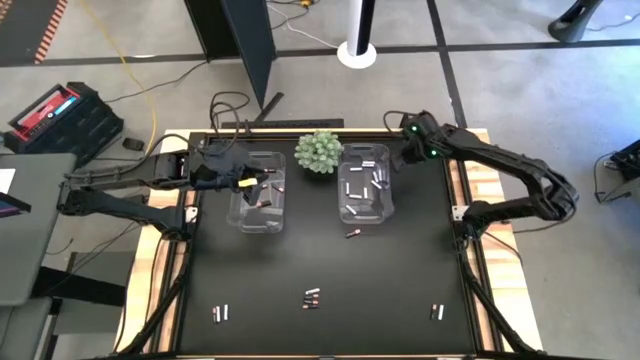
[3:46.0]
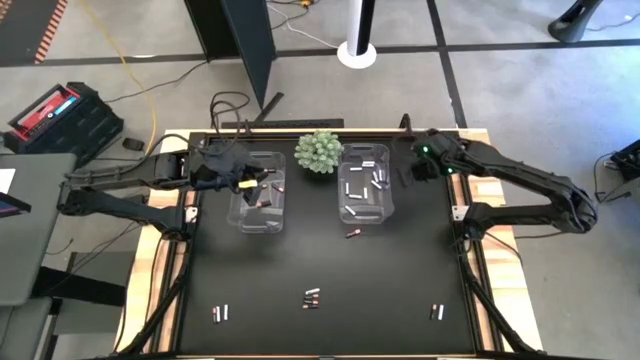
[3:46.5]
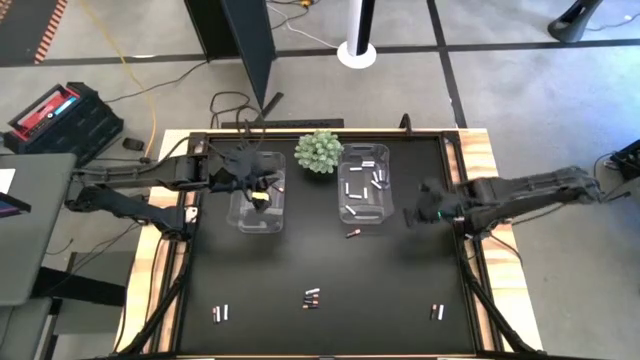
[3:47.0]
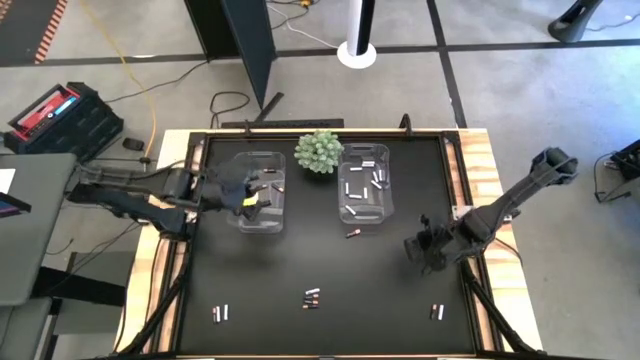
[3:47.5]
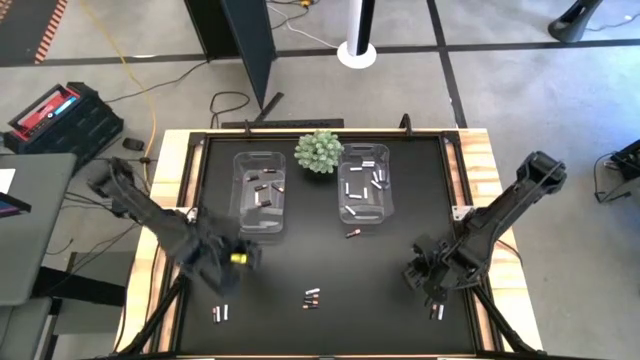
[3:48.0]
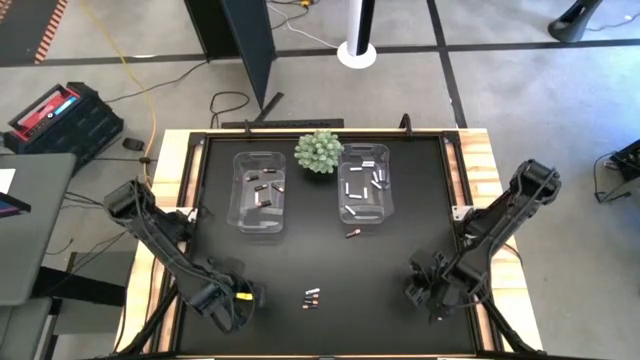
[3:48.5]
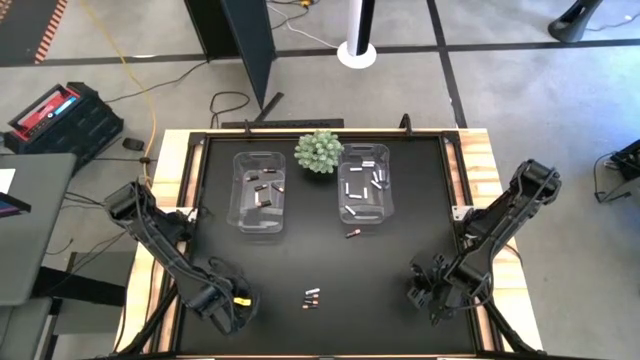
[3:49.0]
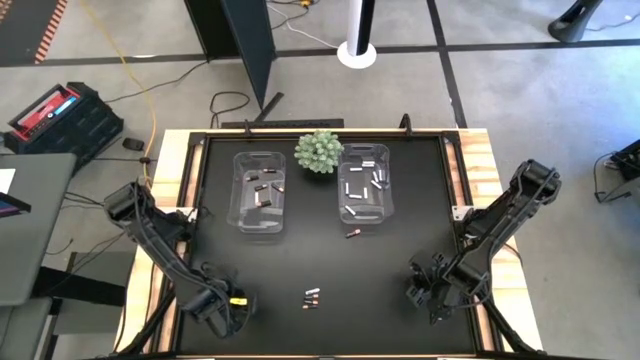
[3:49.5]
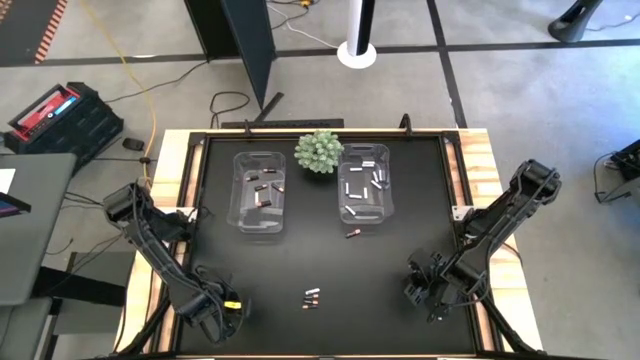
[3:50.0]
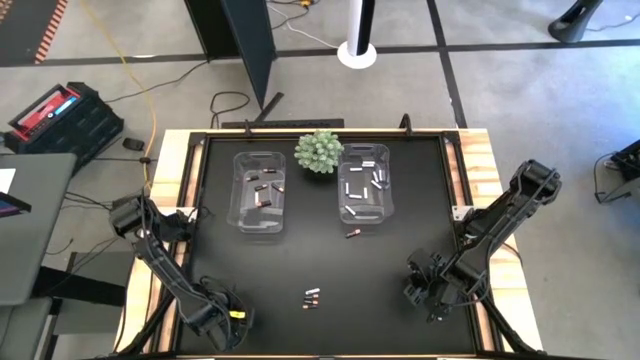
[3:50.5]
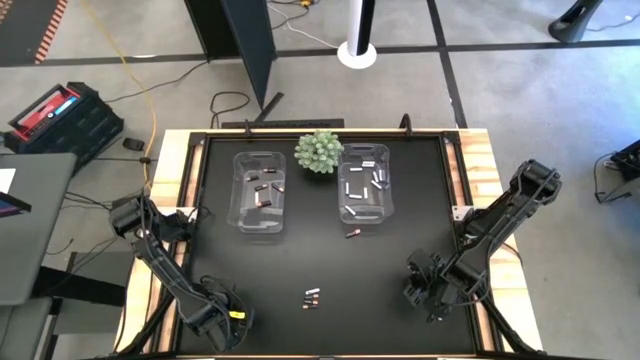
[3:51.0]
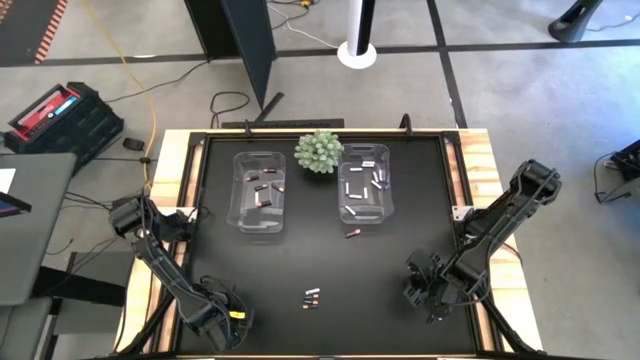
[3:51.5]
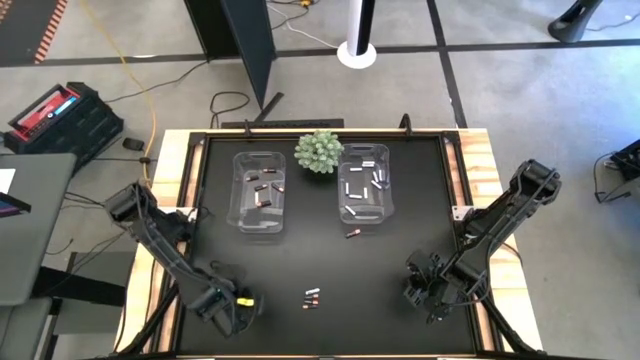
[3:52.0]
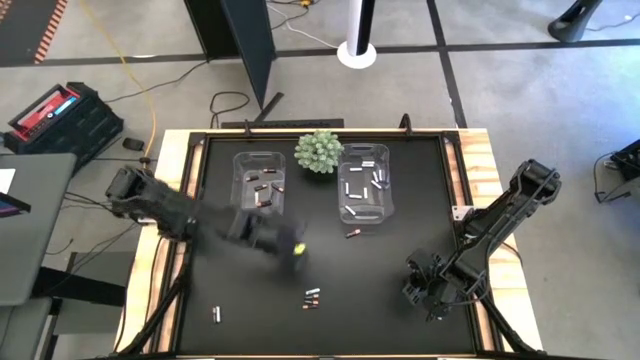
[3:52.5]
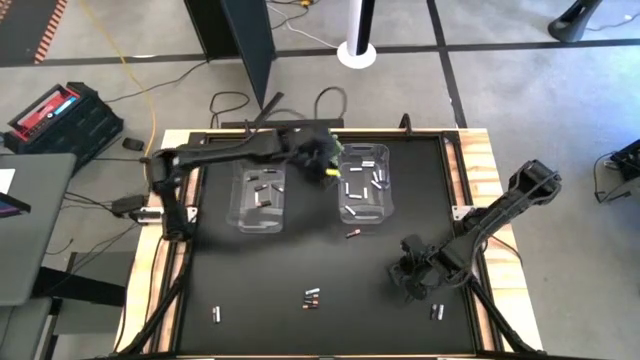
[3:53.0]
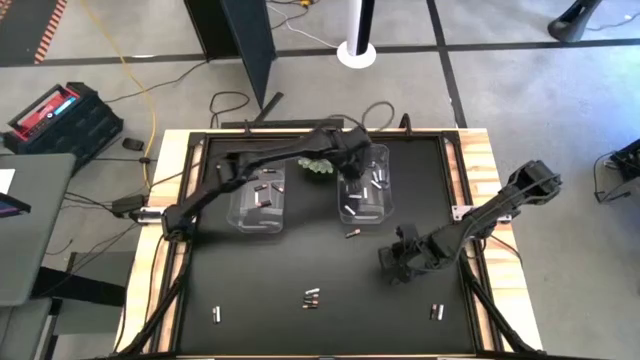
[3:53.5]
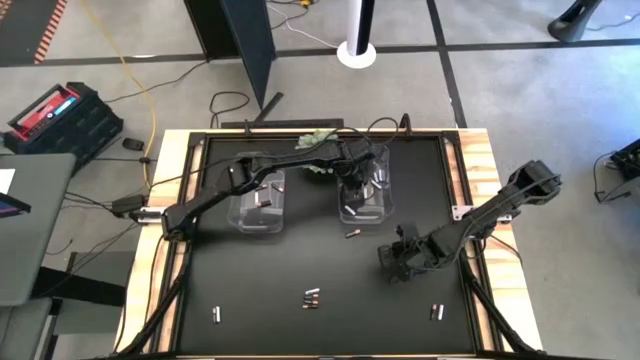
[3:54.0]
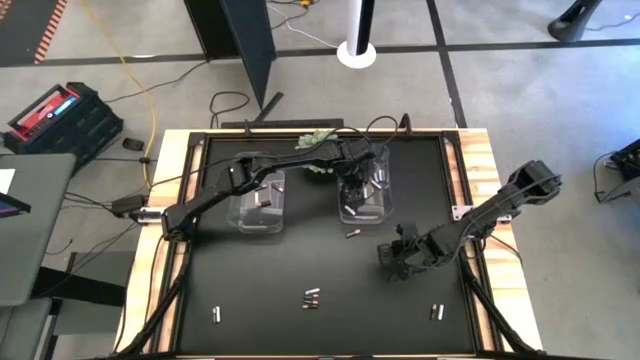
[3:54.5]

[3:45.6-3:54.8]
Task: Sort batteries
Put the white-blue battery into the right transparent bin

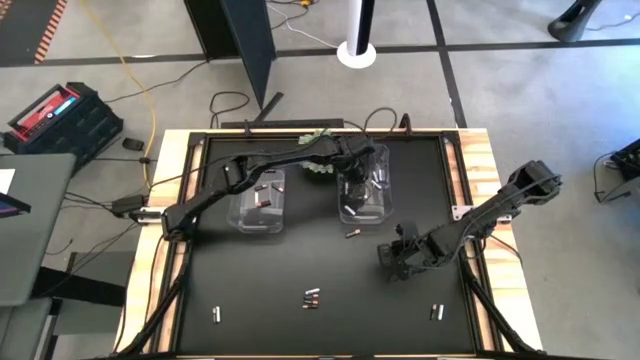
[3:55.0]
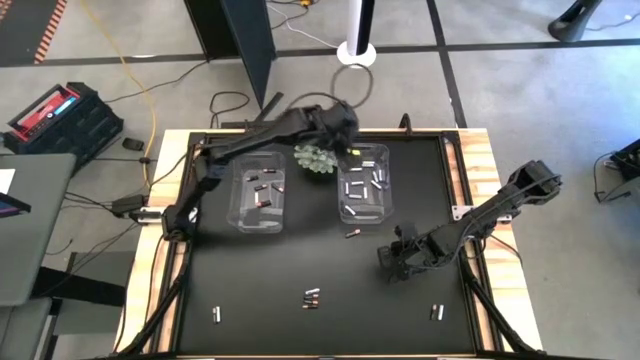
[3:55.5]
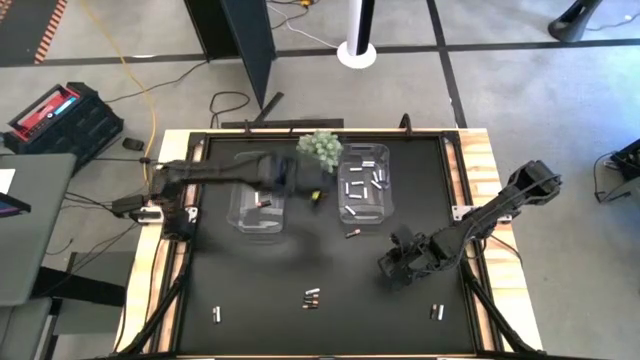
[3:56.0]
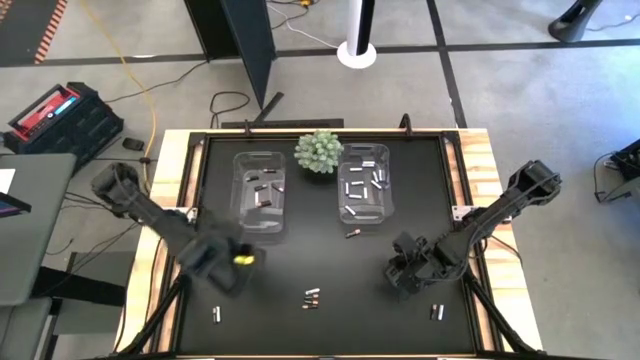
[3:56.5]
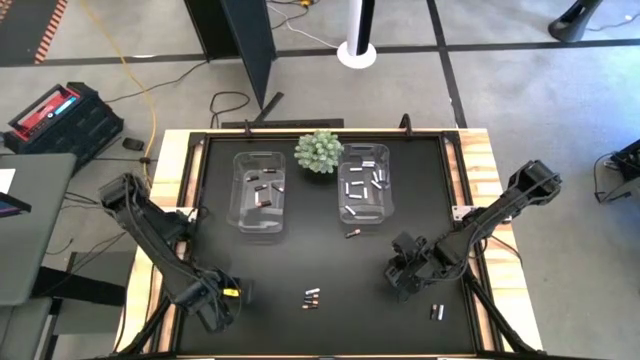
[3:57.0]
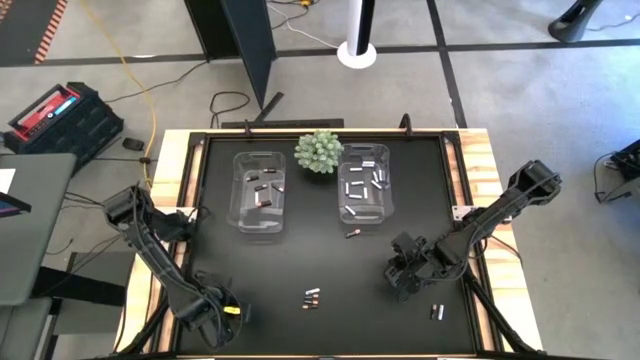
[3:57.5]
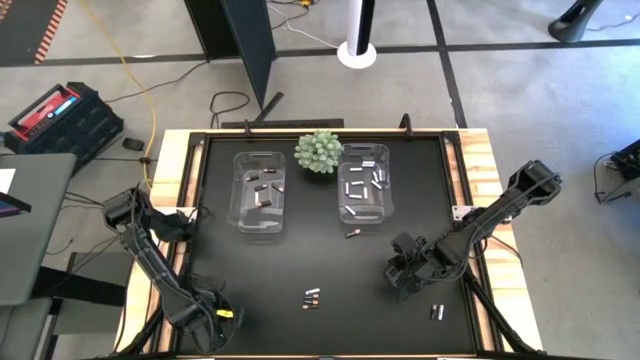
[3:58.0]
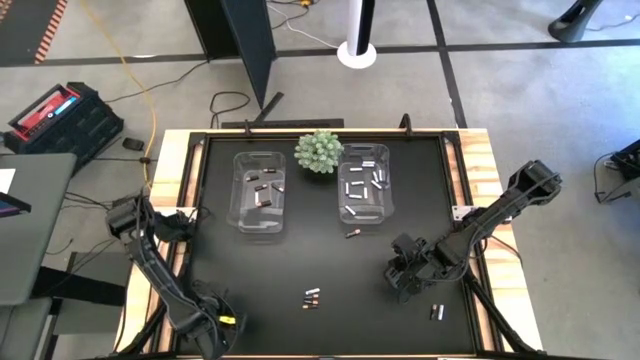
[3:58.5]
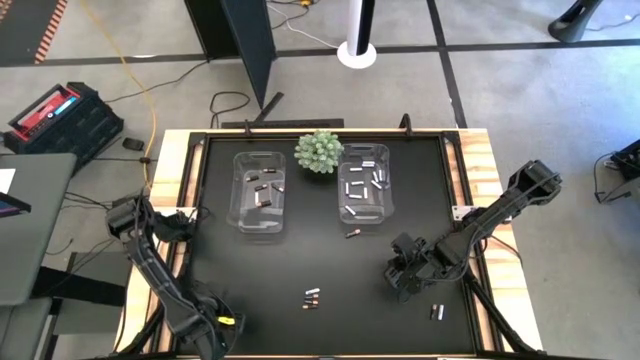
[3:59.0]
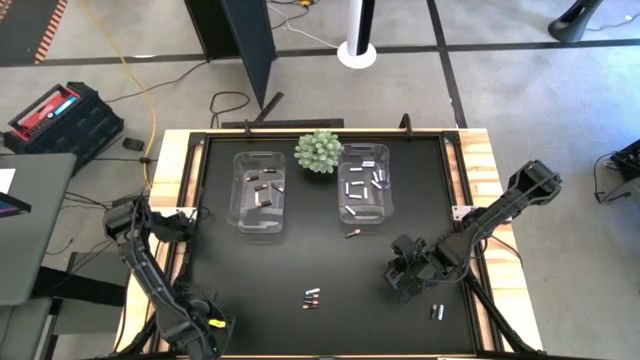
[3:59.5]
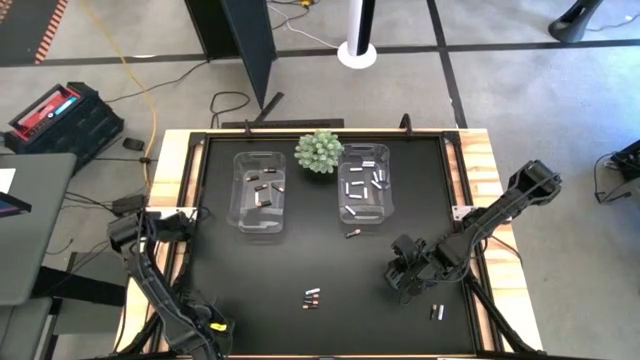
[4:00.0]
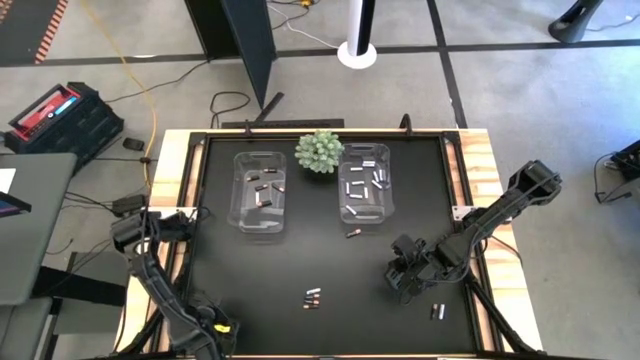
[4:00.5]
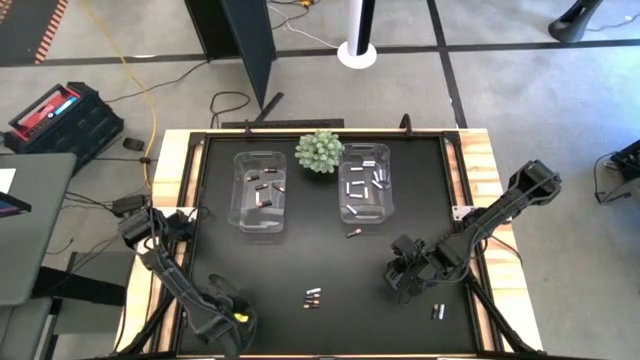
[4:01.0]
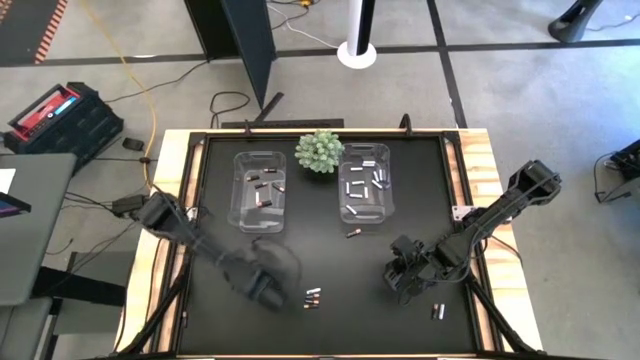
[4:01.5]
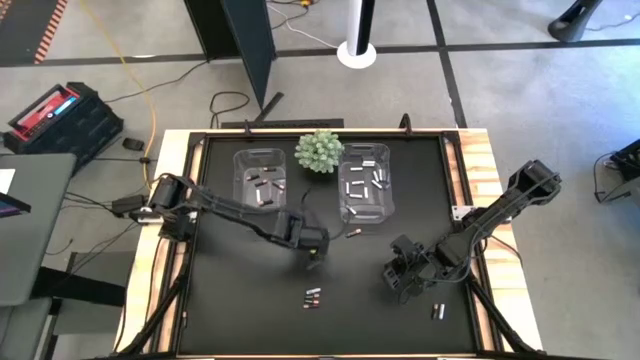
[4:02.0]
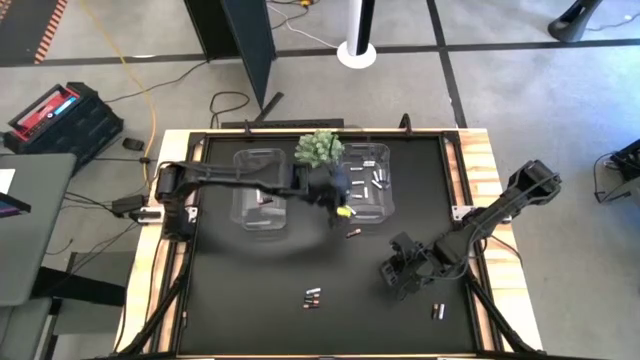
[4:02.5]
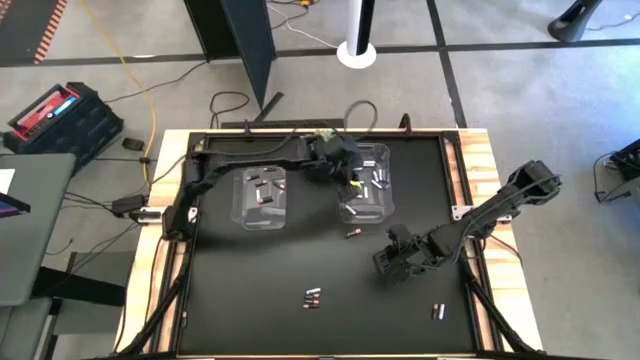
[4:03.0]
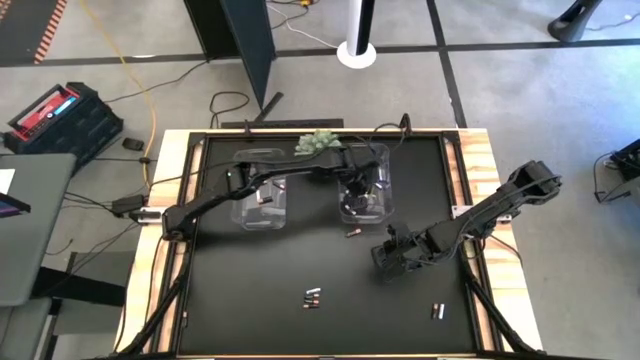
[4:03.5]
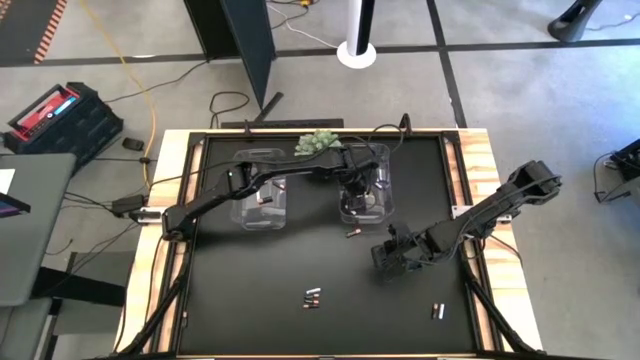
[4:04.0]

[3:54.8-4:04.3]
Put the white-blue battery into the right transparent bin

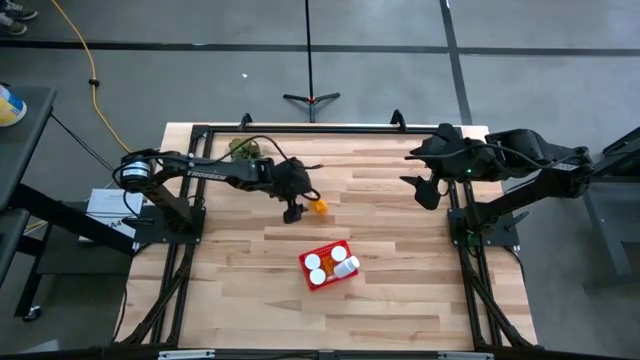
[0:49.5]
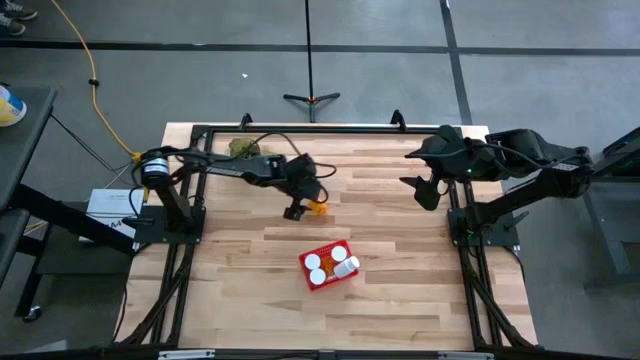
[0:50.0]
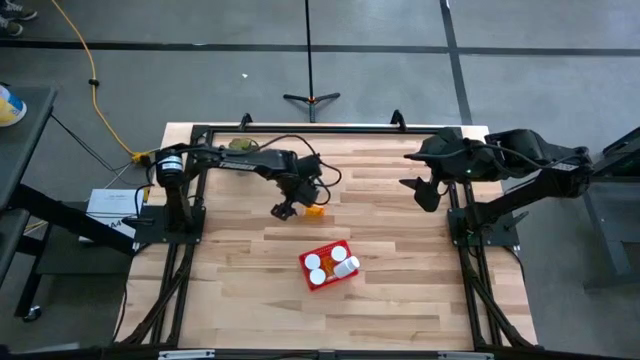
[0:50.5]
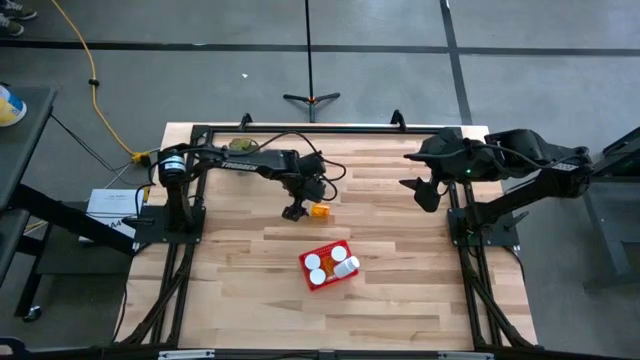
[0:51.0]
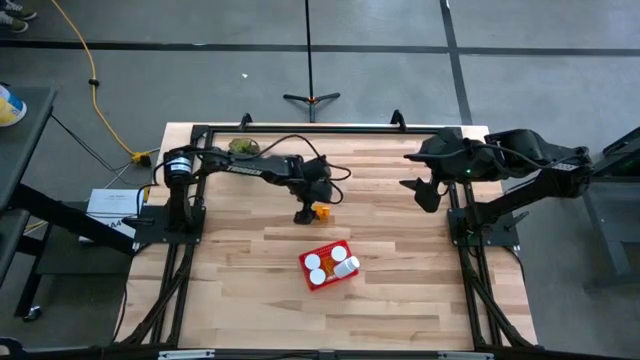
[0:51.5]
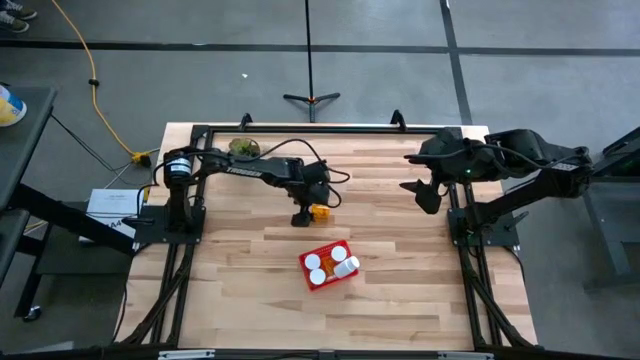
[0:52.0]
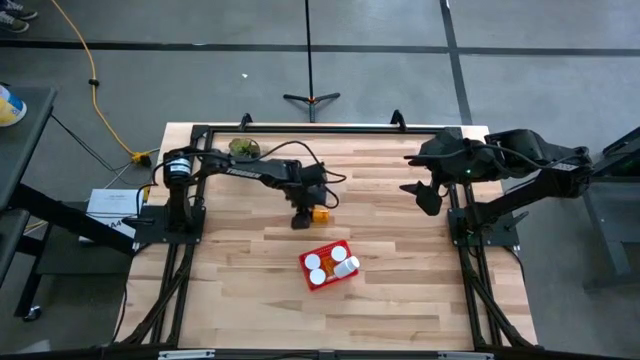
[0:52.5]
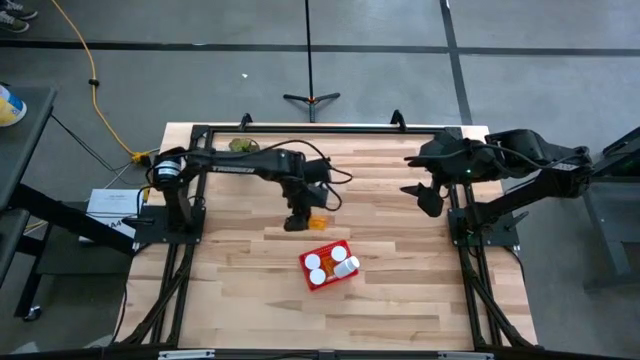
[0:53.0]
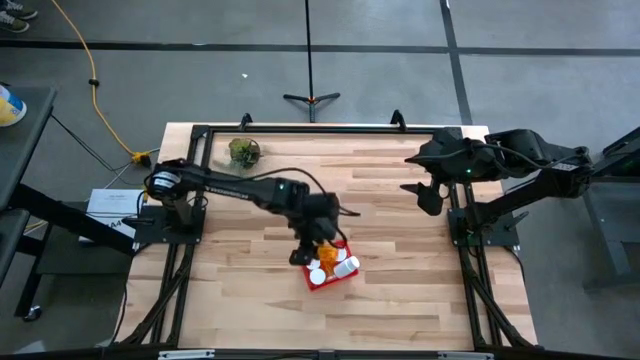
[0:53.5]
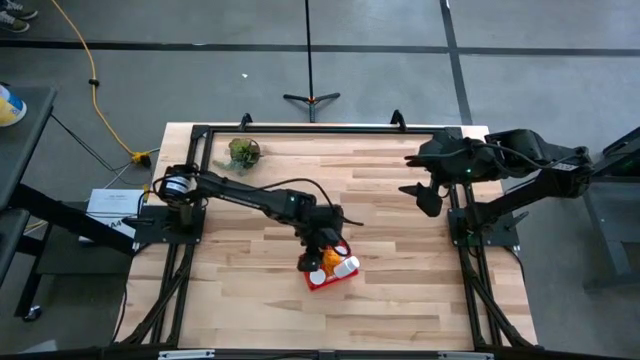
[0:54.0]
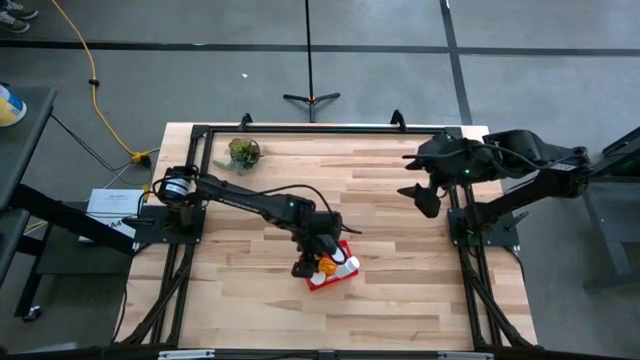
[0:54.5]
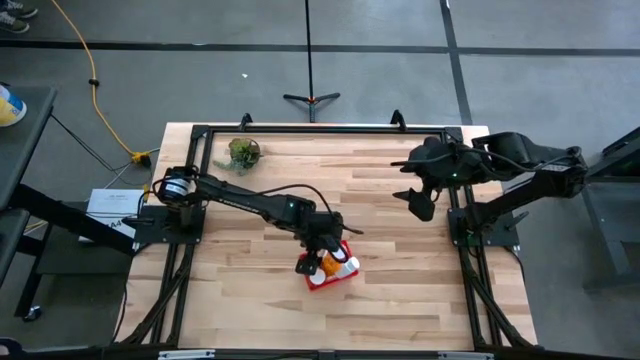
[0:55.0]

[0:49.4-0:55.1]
Task: Pick and place pill bottles into a basket
Put the orange pill bottle into the red bin
